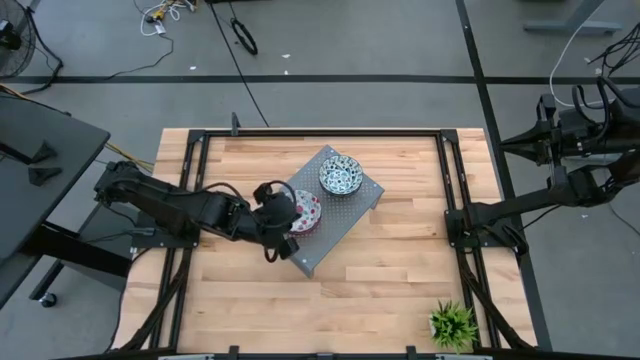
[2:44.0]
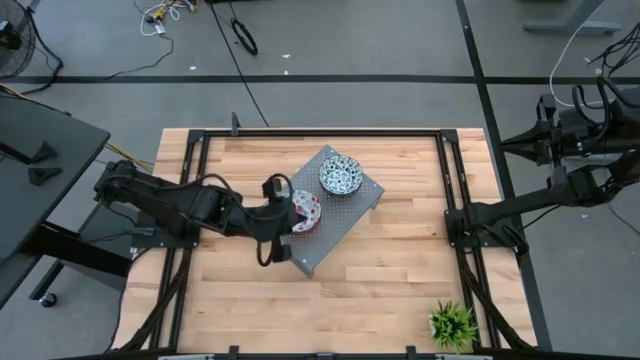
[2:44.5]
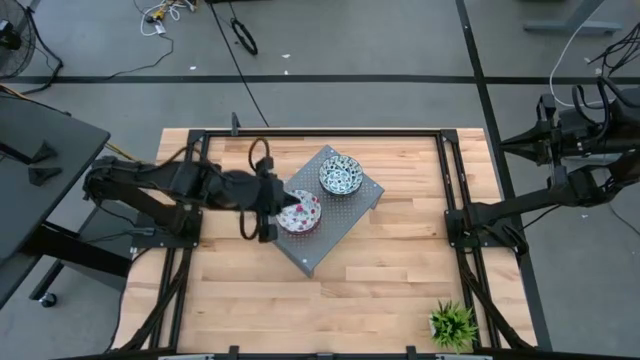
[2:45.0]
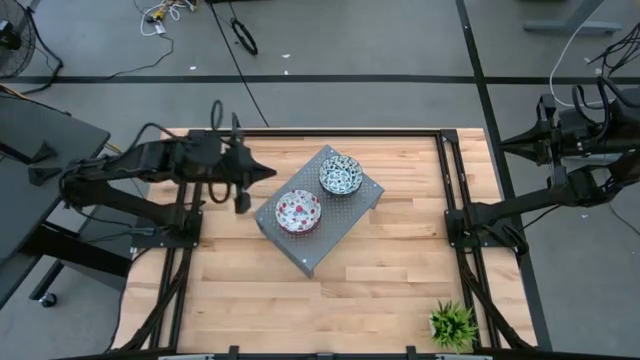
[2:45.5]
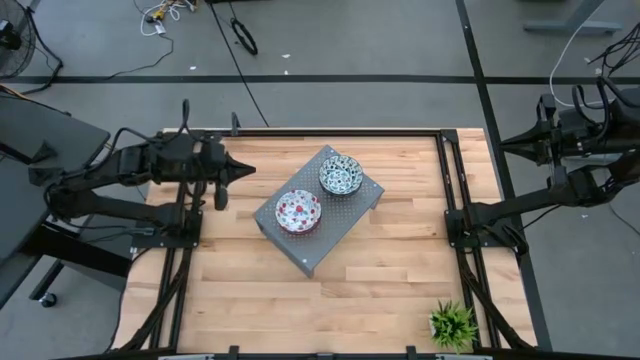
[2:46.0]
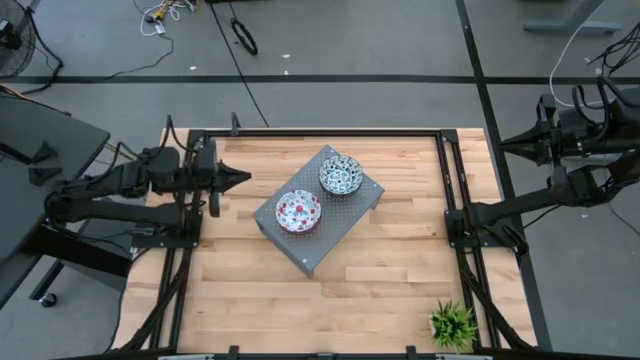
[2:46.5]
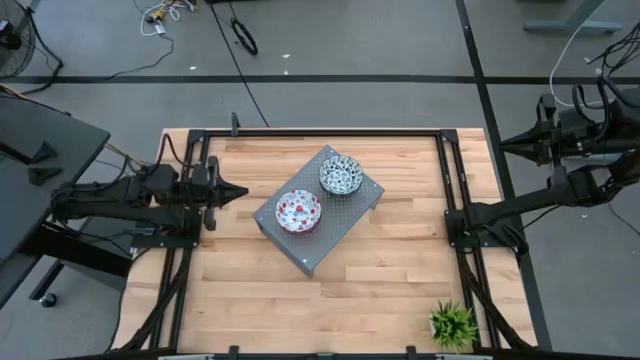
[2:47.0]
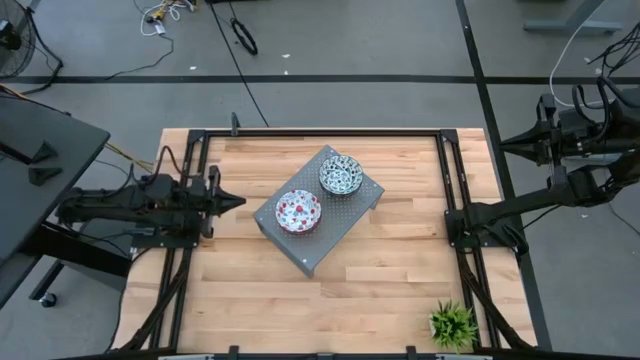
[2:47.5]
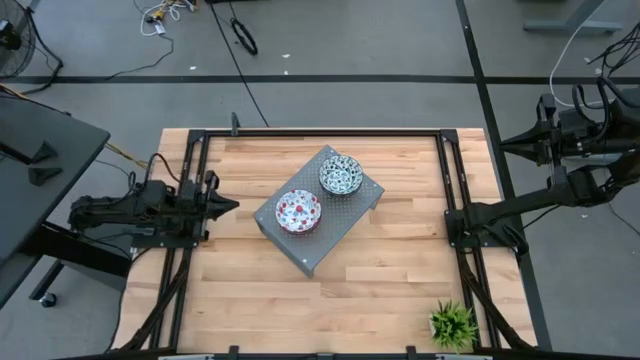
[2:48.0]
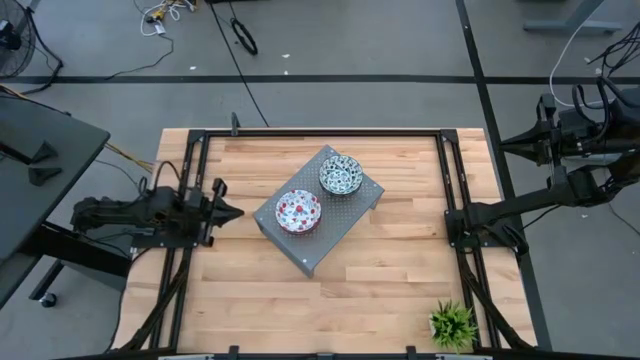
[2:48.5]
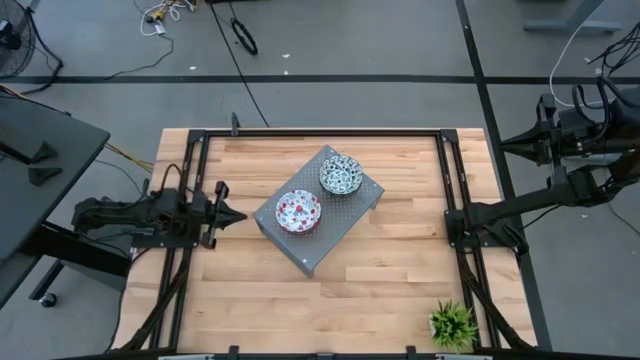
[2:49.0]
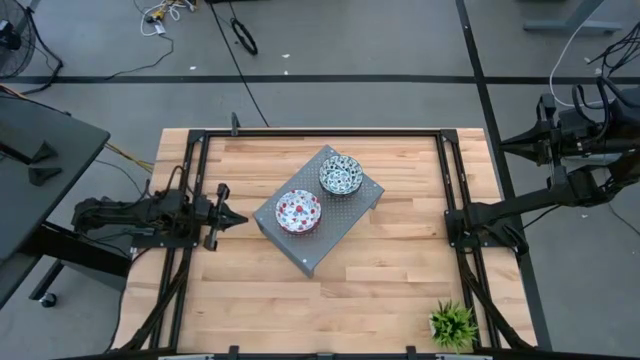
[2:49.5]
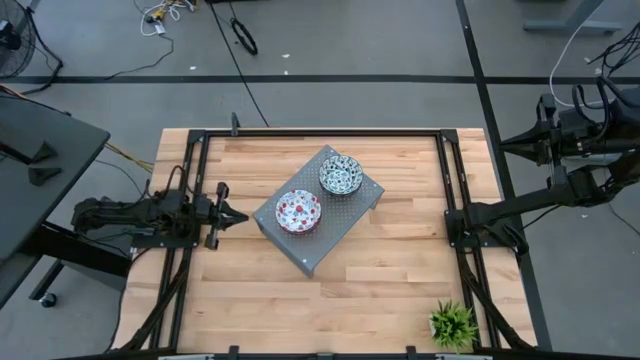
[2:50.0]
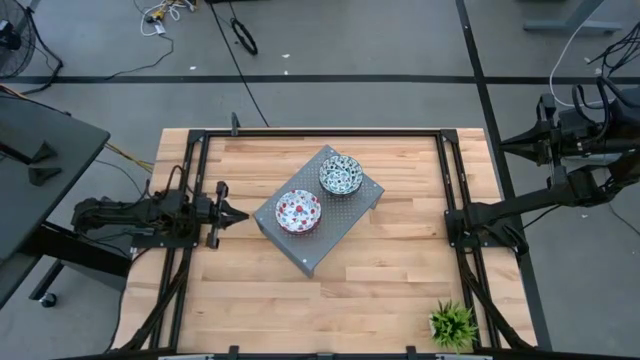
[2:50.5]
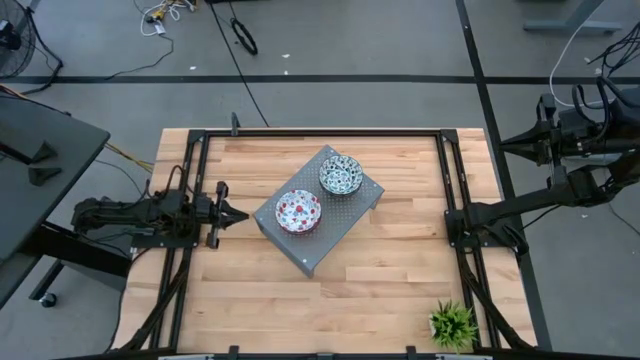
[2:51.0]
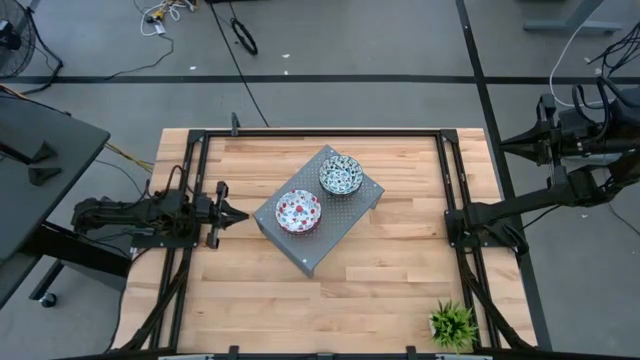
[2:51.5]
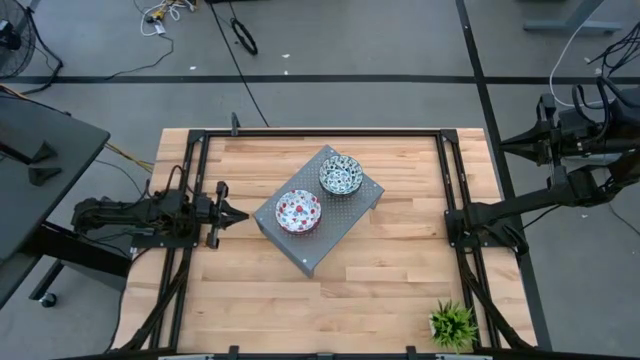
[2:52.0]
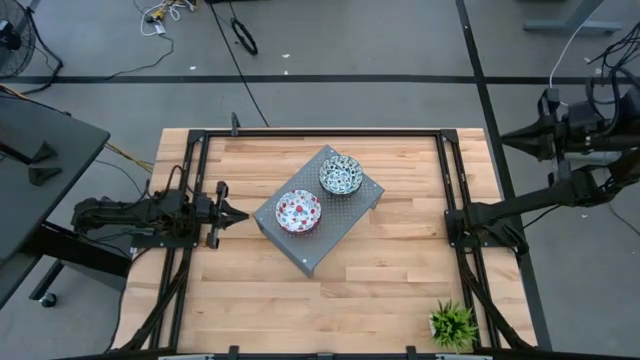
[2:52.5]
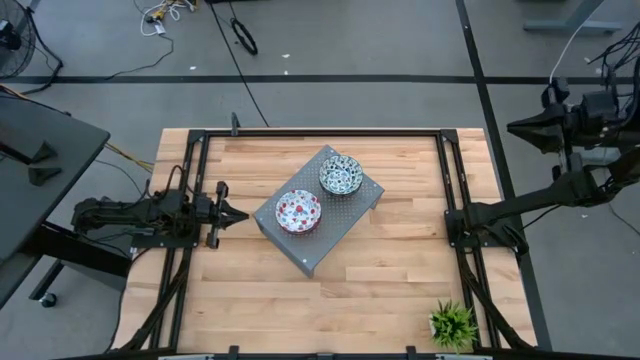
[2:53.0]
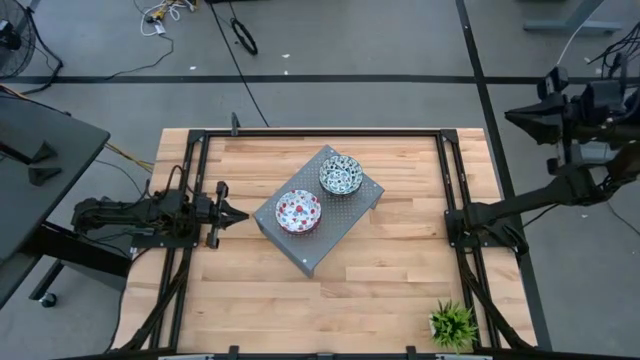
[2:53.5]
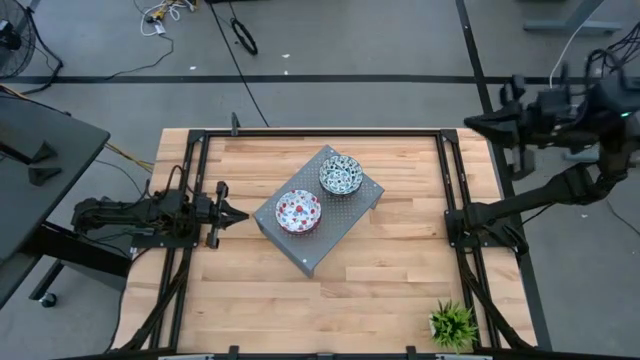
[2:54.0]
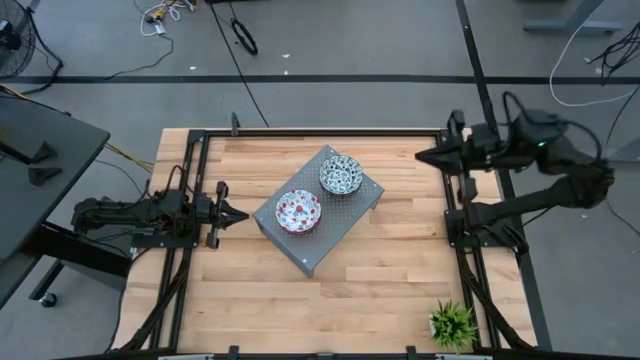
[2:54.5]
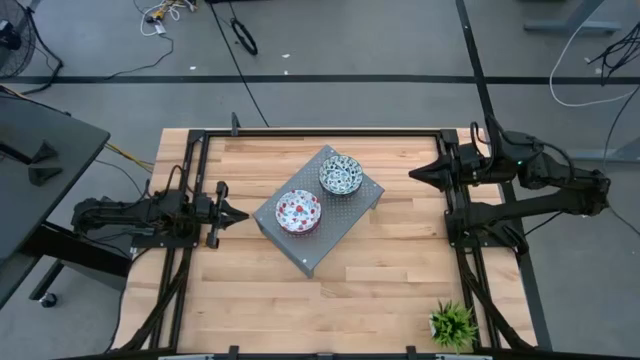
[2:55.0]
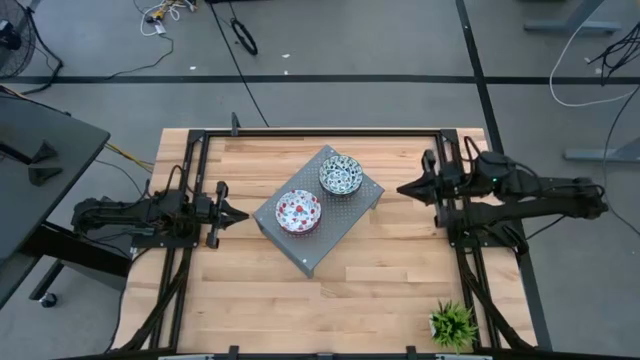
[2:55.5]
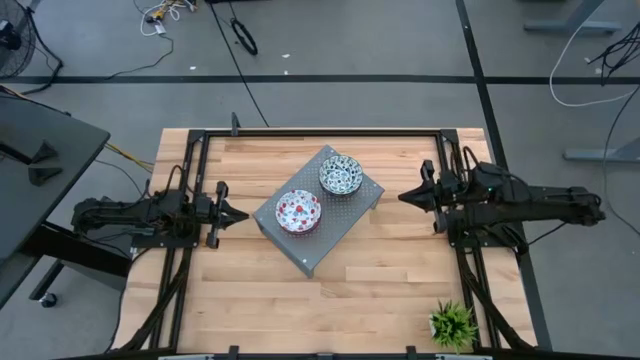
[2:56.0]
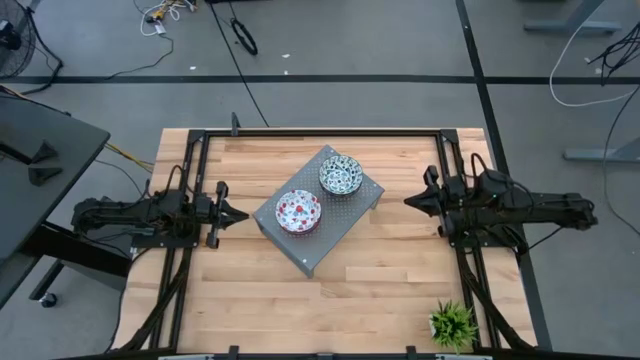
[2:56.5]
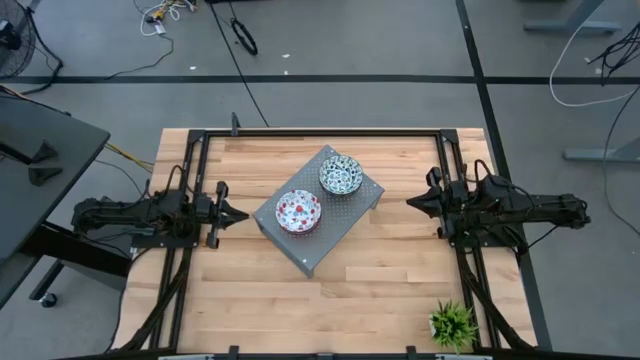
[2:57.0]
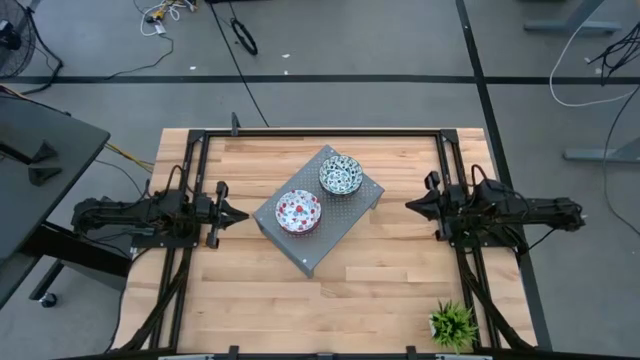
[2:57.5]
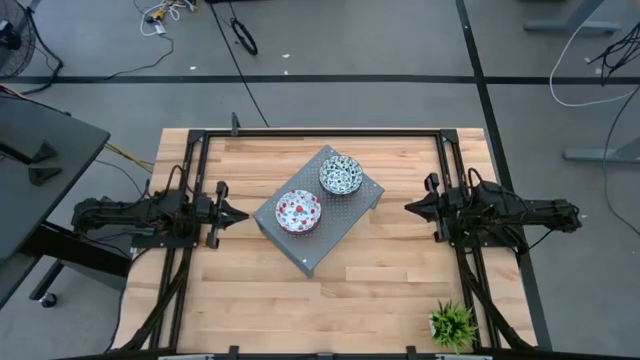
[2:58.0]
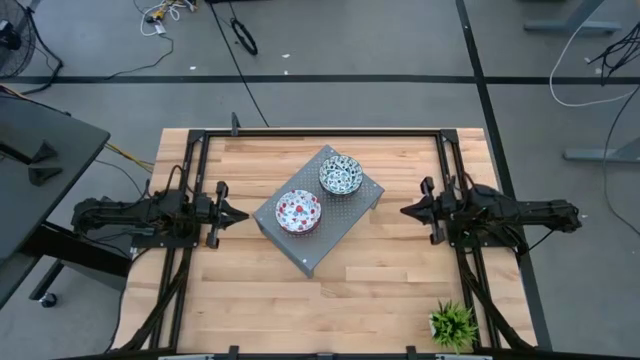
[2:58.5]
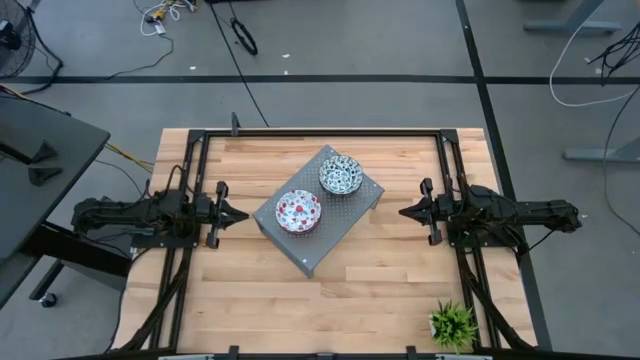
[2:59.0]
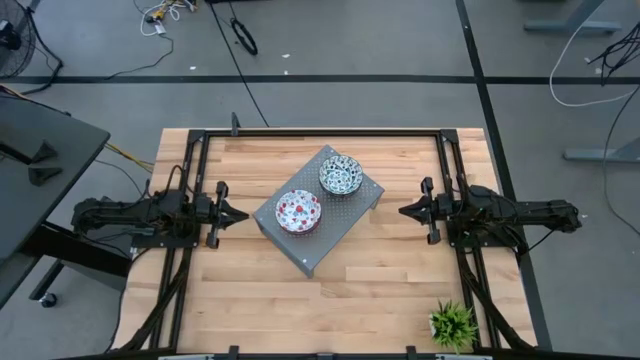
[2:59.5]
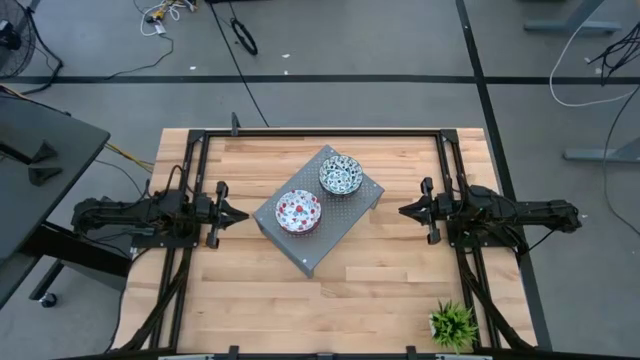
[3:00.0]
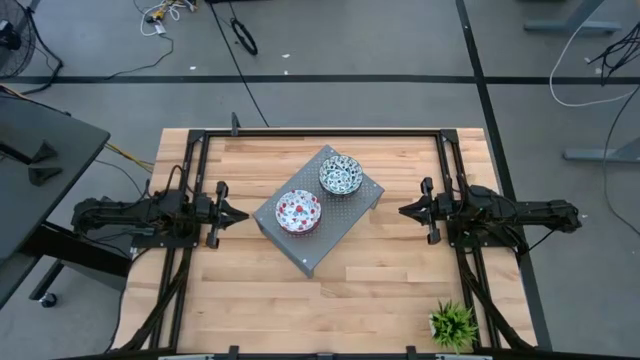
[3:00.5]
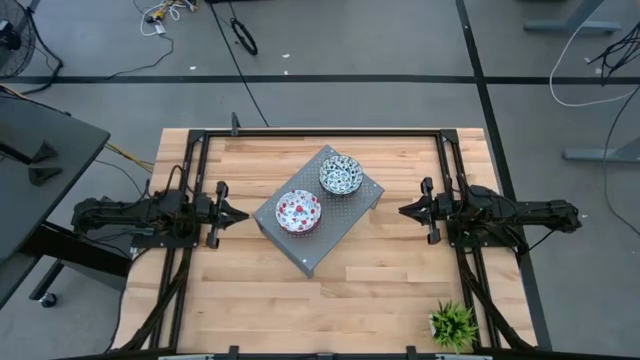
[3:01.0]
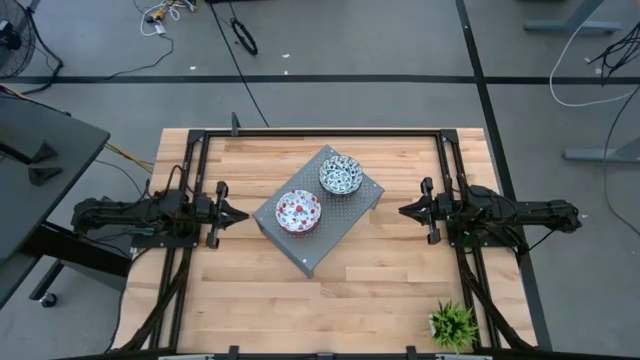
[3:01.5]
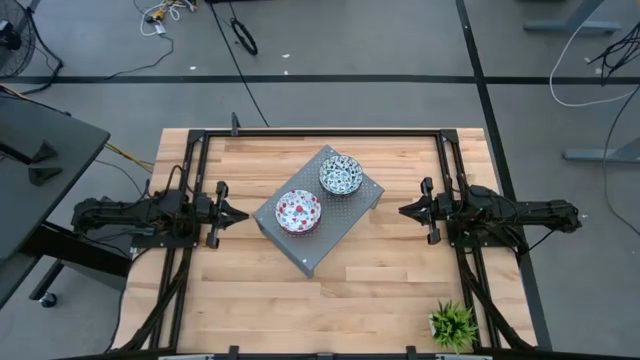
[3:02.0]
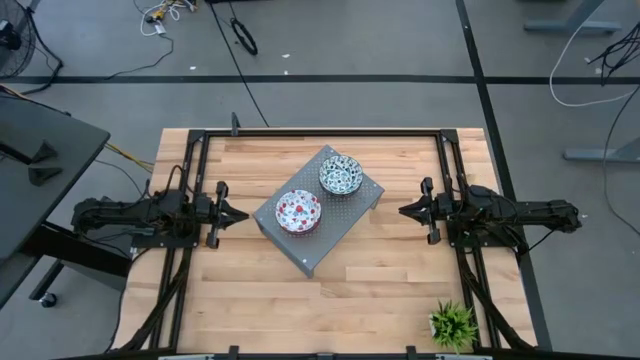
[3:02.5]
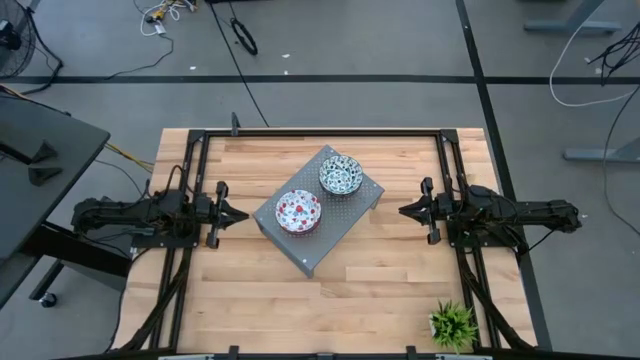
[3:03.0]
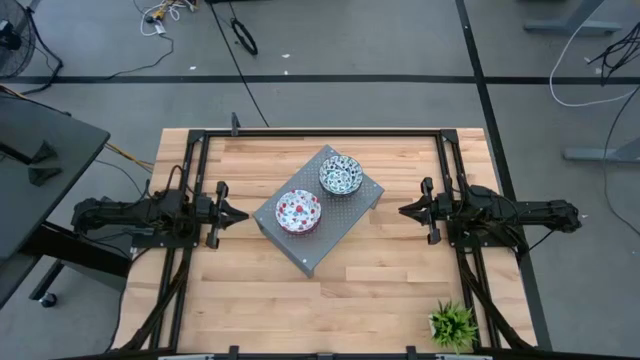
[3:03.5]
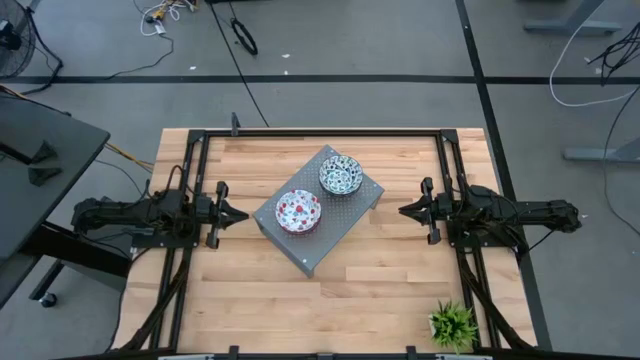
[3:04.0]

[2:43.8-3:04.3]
Task: Pick & Place Mini bowls
Return to Home Position

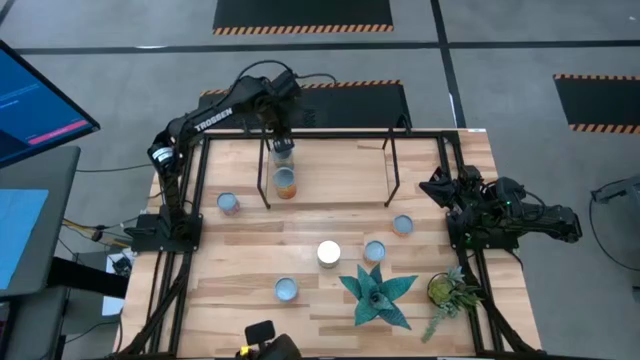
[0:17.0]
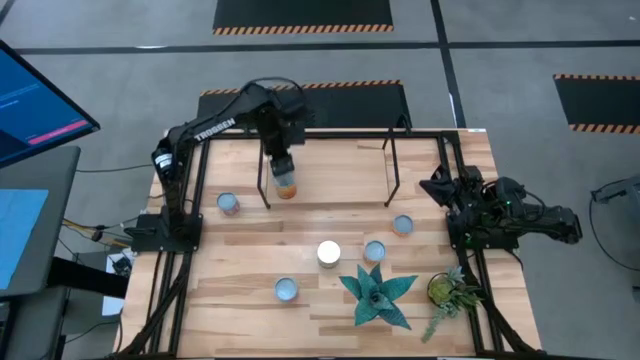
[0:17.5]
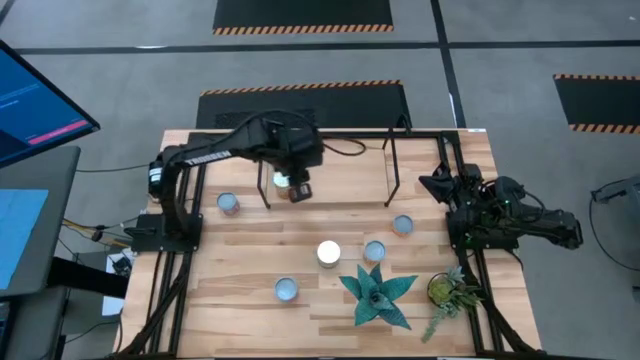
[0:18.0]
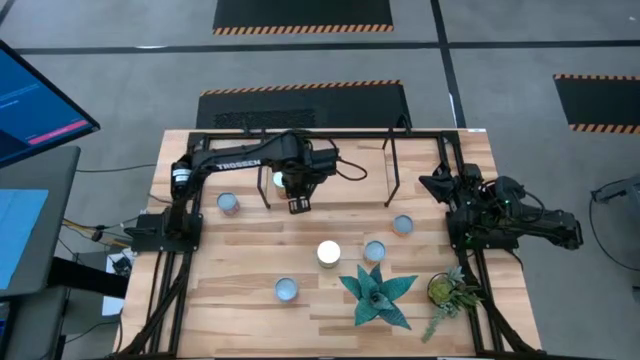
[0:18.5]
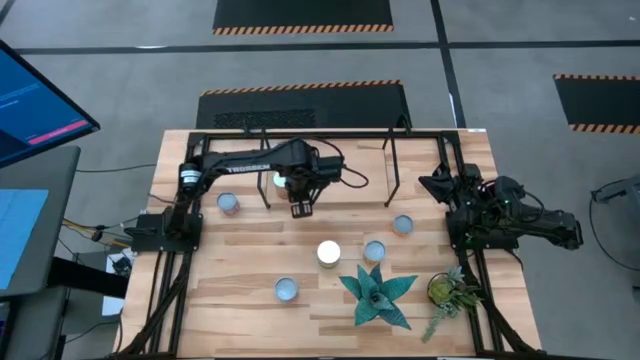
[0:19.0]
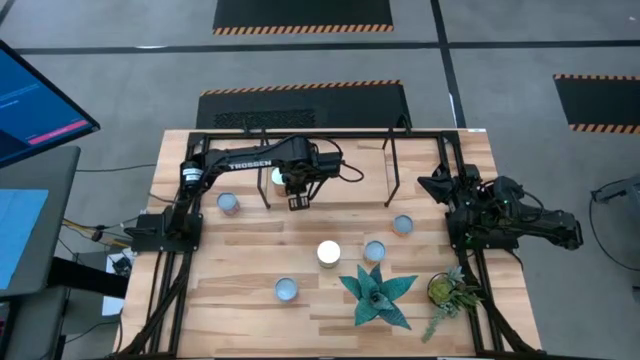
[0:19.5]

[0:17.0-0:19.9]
Task: Pick and place cans onto a shelf
Adjust the canned beans on the shelf
